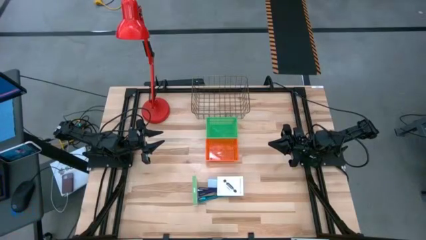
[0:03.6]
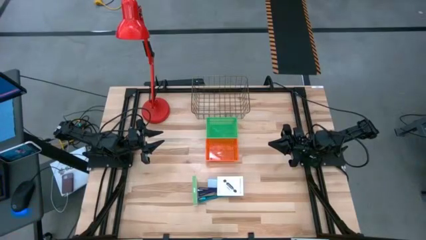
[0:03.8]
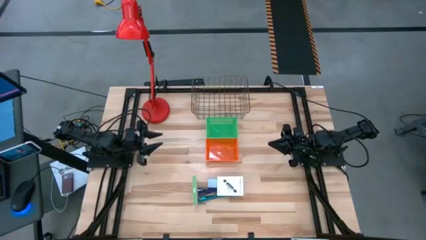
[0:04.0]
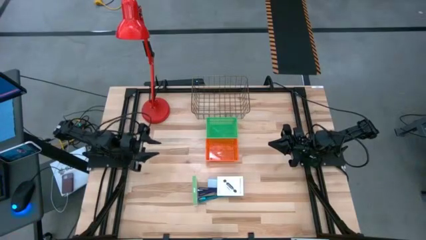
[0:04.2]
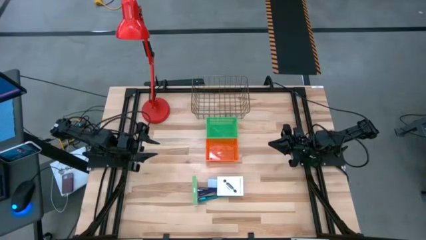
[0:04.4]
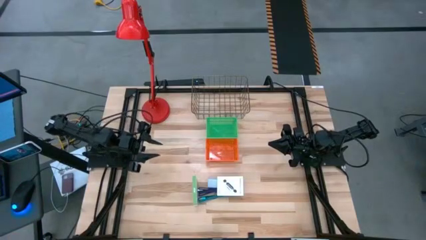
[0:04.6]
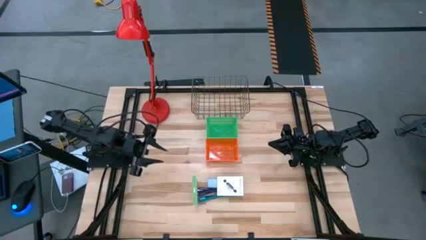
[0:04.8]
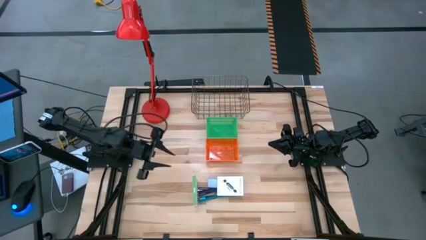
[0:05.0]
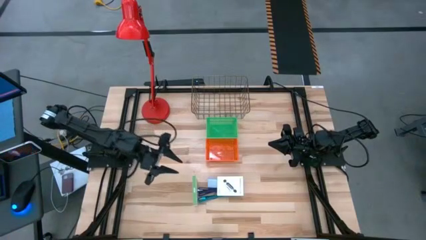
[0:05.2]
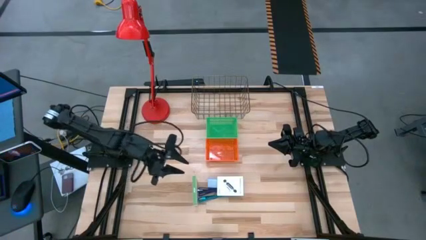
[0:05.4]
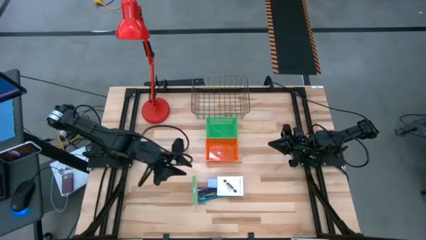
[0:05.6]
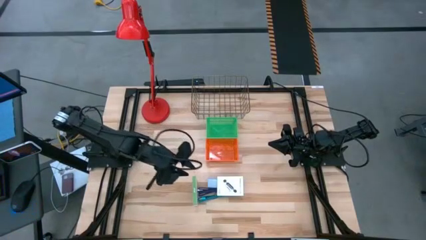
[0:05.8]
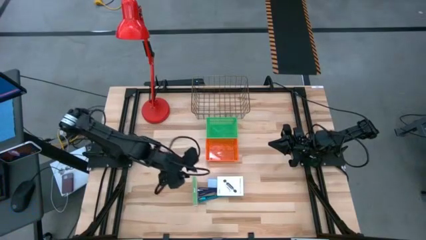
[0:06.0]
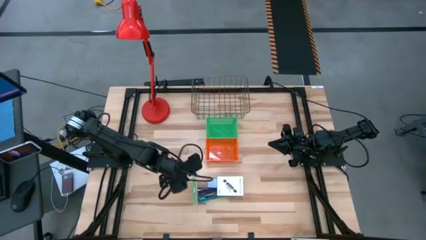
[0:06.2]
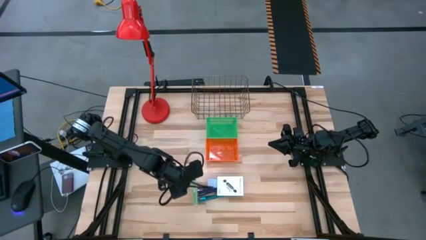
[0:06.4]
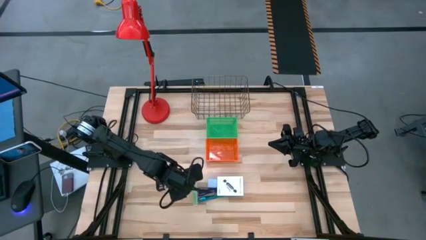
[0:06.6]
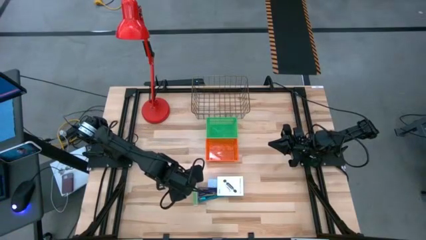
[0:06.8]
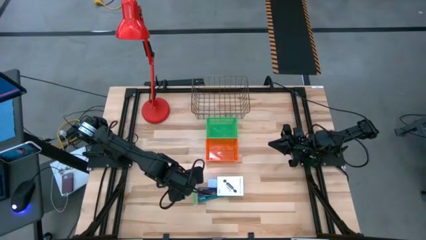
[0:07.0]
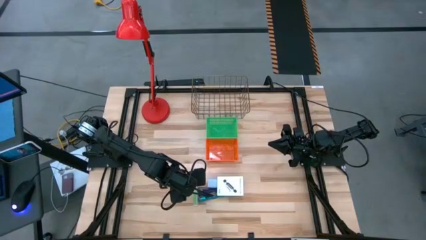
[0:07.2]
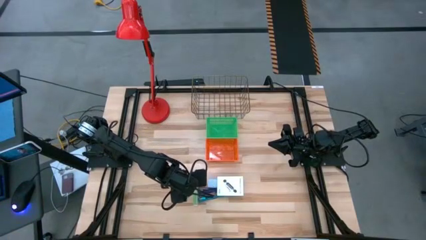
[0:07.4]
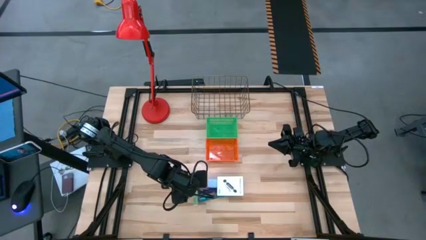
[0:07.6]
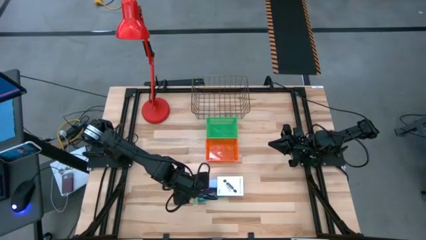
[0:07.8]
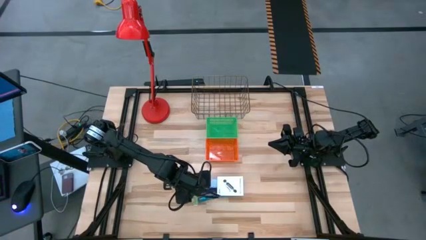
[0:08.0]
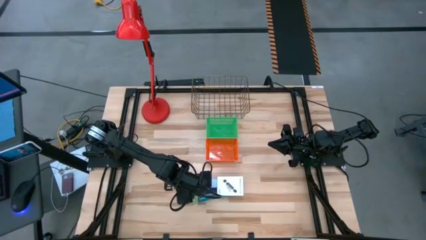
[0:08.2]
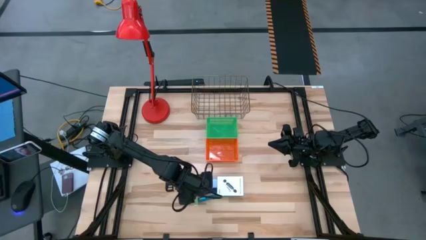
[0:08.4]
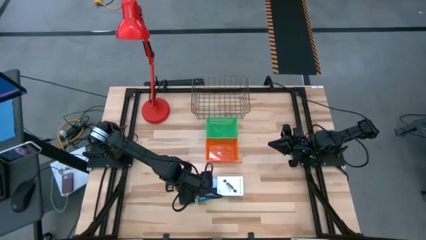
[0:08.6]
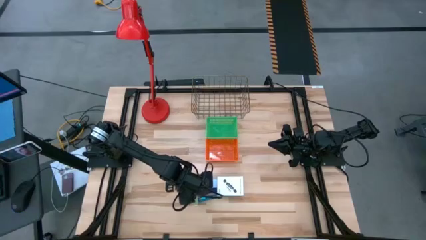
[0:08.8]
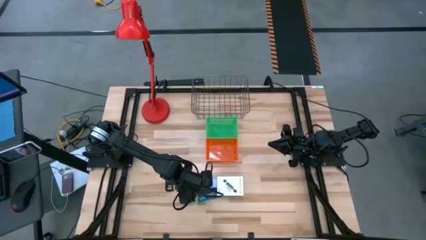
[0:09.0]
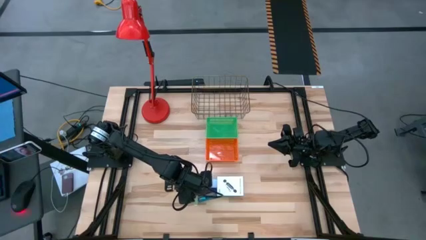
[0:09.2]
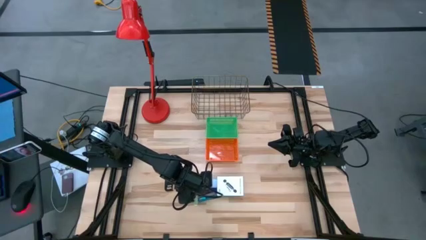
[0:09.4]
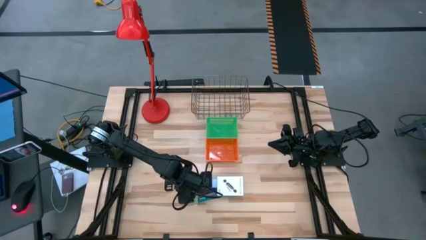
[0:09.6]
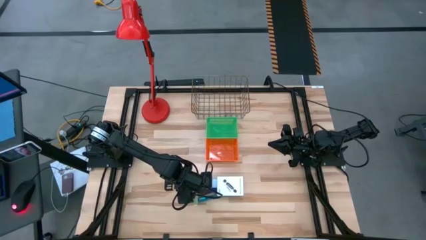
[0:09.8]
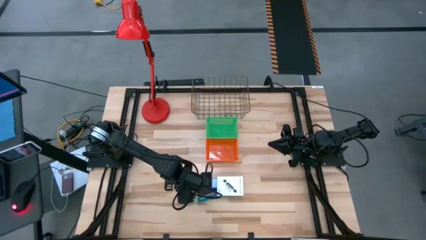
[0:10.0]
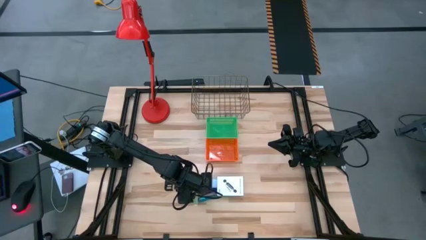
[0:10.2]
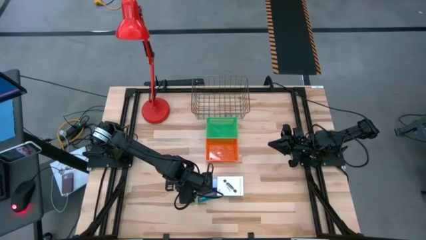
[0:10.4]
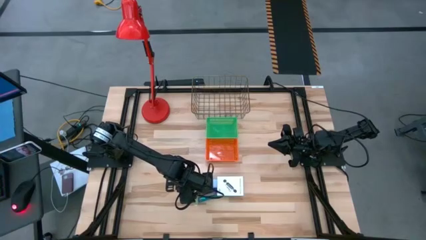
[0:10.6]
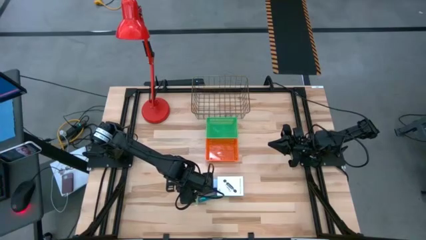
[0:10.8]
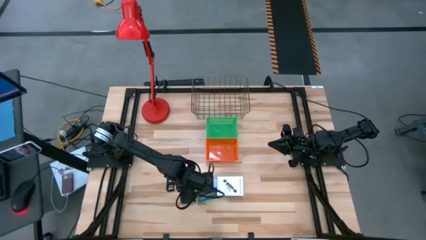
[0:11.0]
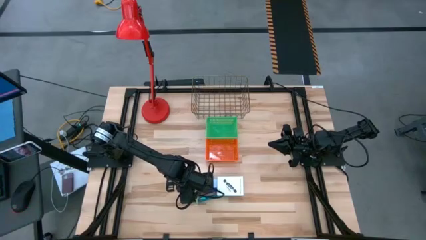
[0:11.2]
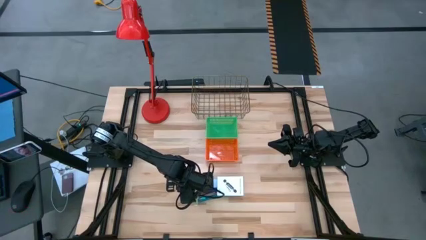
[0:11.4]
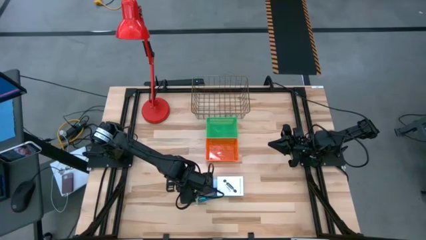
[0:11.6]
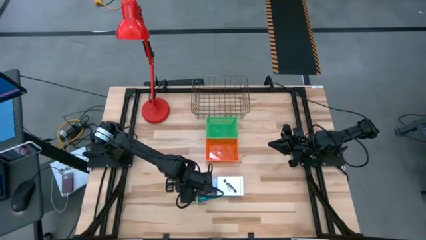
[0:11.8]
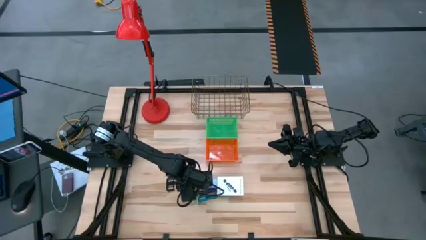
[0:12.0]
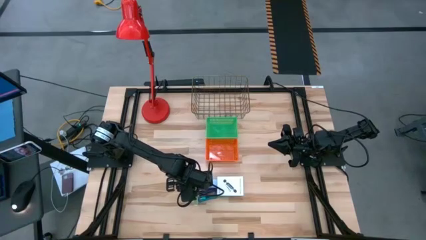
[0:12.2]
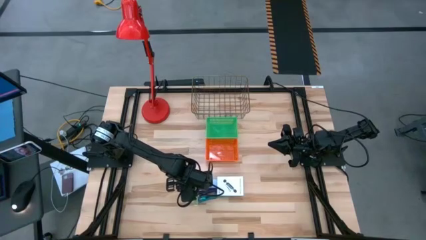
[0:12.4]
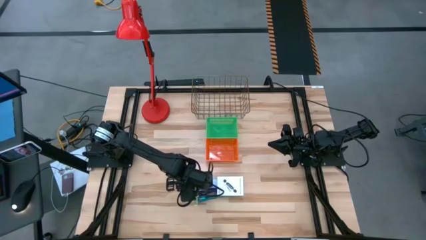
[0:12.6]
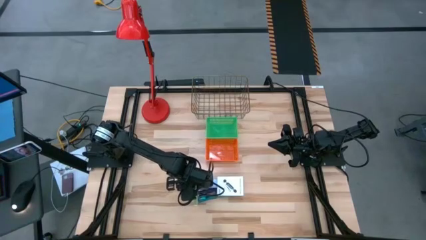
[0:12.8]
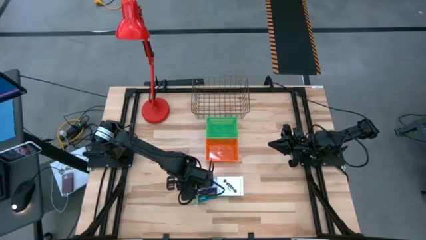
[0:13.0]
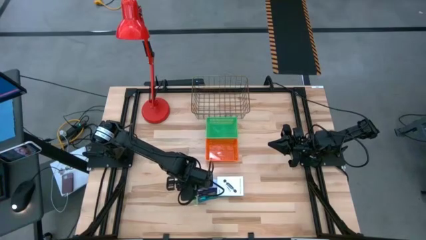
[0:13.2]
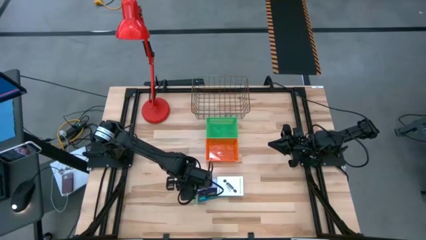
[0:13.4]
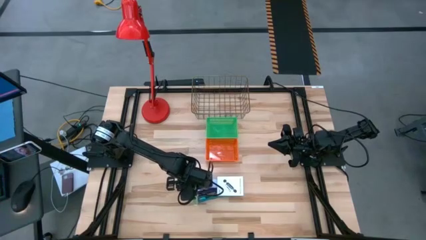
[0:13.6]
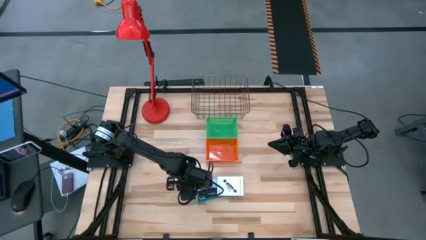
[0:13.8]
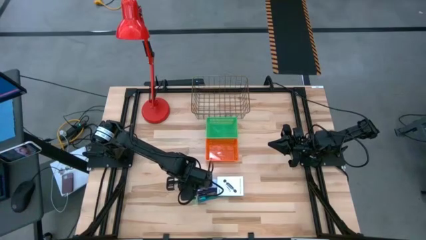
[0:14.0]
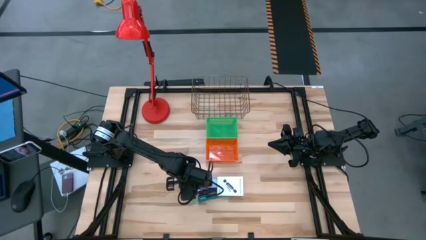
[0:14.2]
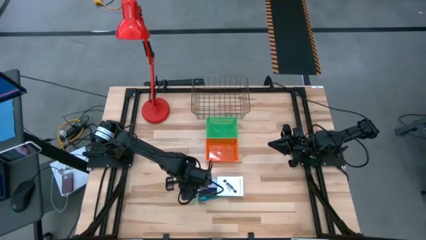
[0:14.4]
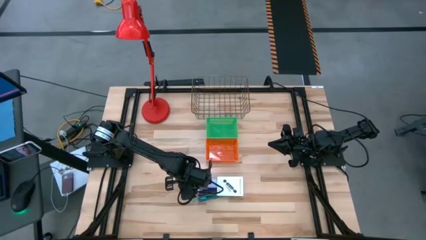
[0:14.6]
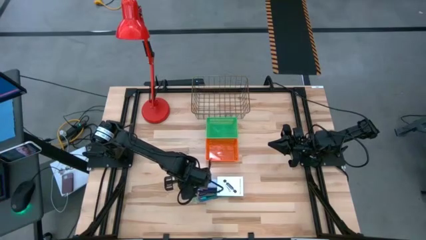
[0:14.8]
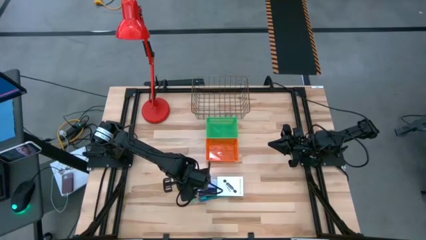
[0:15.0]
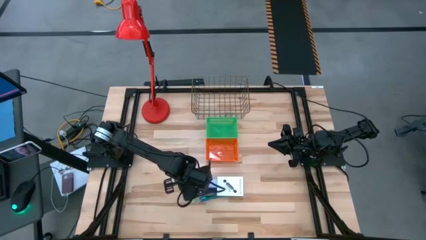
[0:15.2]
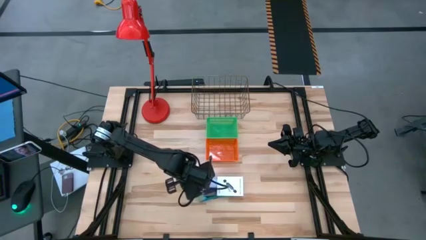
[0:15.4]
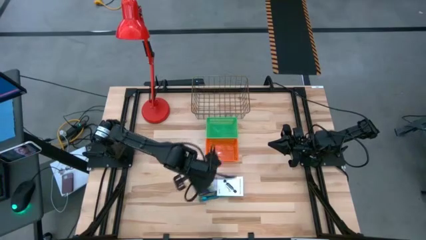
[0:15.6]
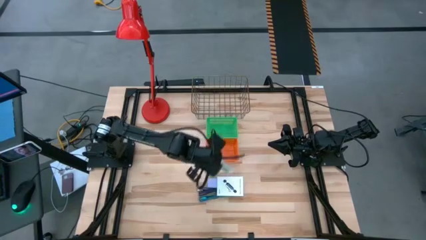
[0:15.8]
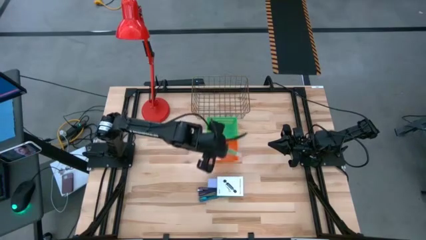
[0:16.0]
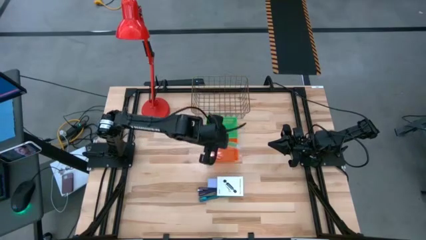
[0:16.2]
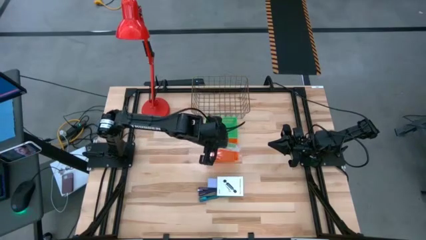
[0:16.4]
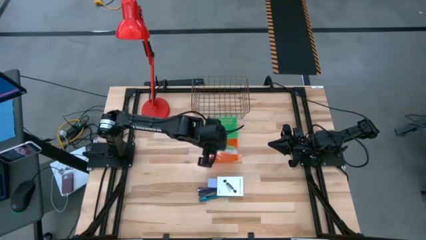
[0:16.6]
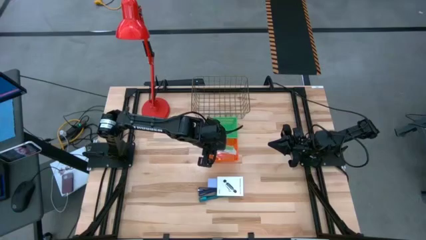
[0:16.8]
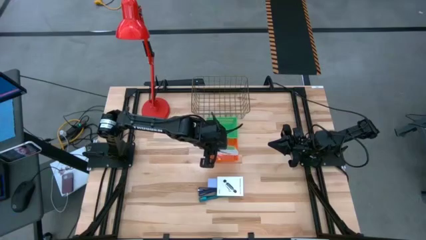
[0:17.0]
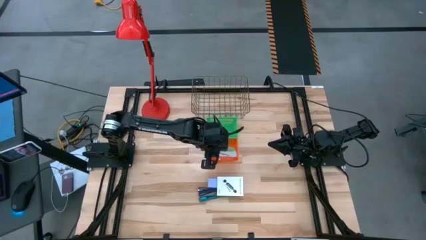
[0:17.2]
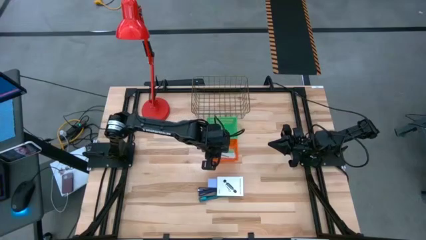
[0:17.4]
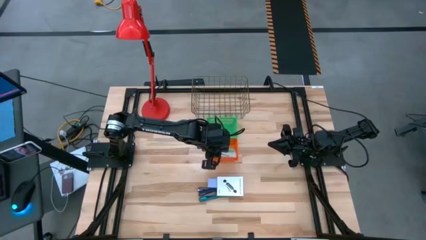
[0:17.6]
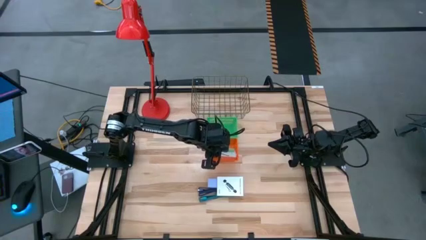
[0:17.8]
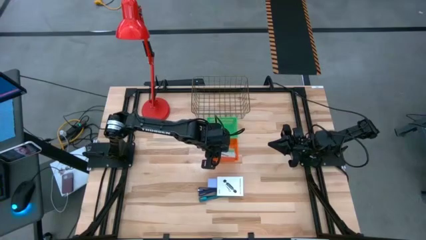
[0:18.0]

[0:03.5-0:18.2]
Task: Pick and place items into bin
Put the left white card reader box into the orange basket
